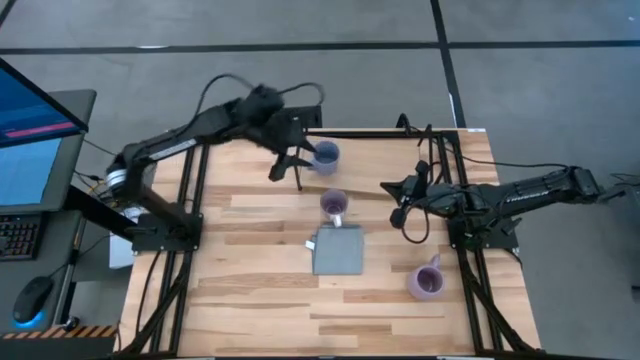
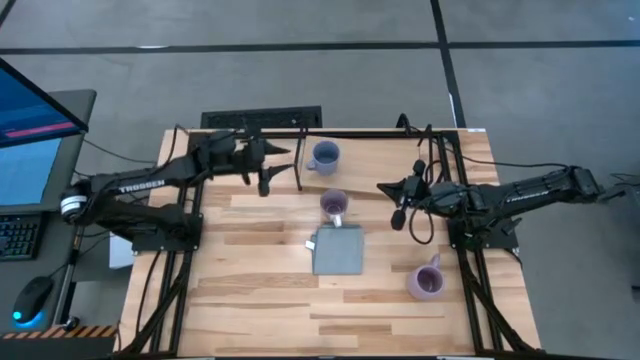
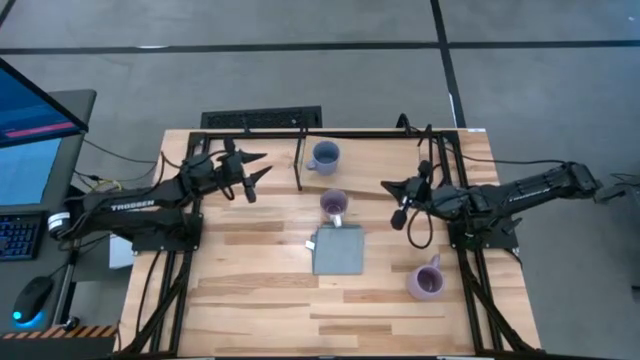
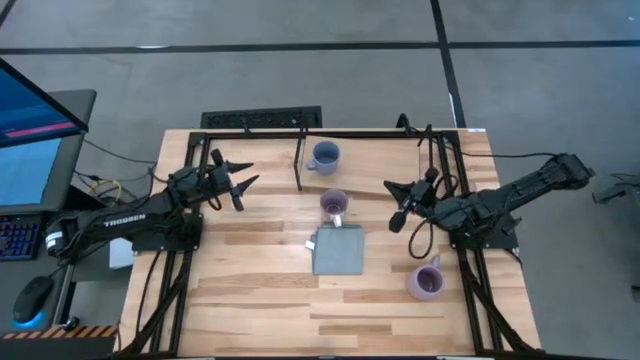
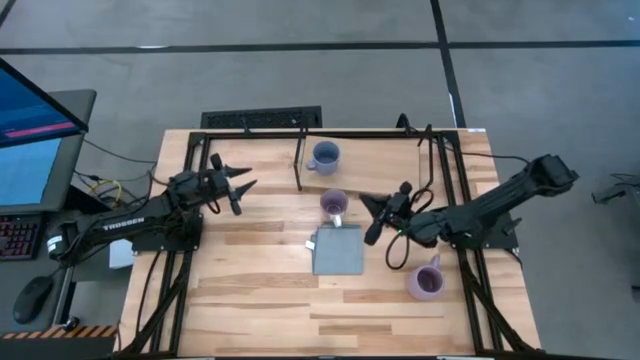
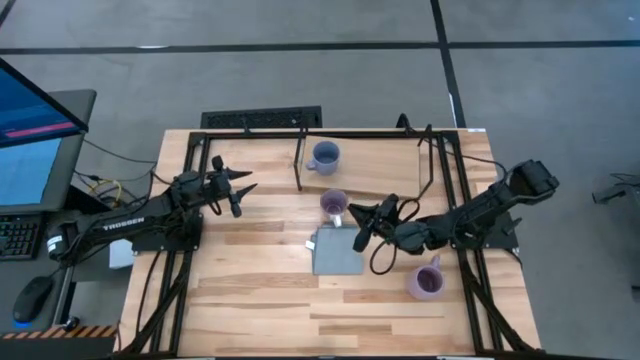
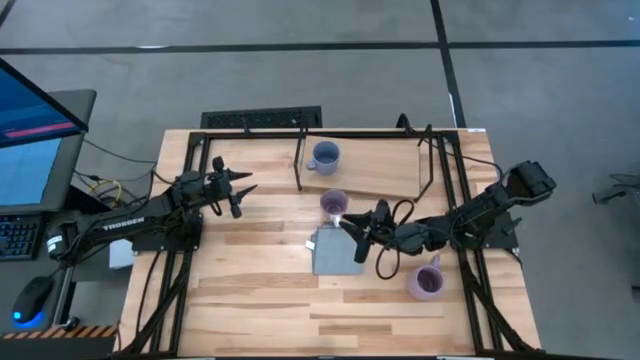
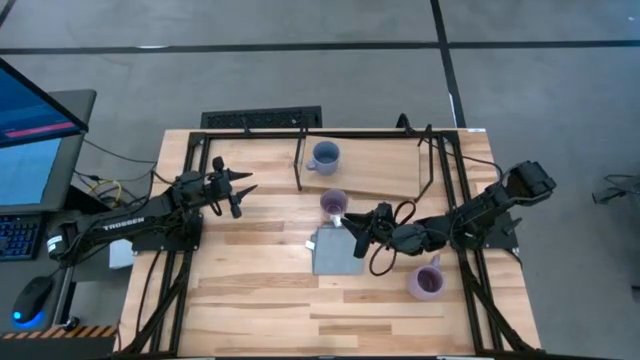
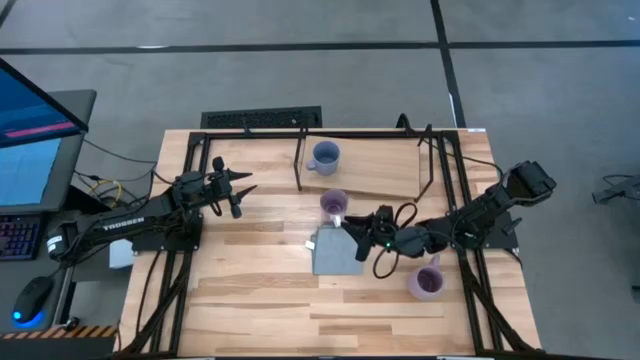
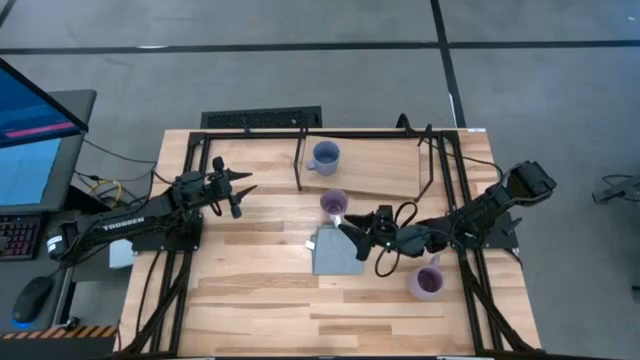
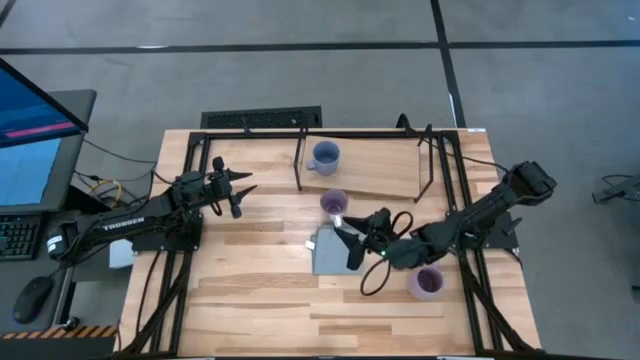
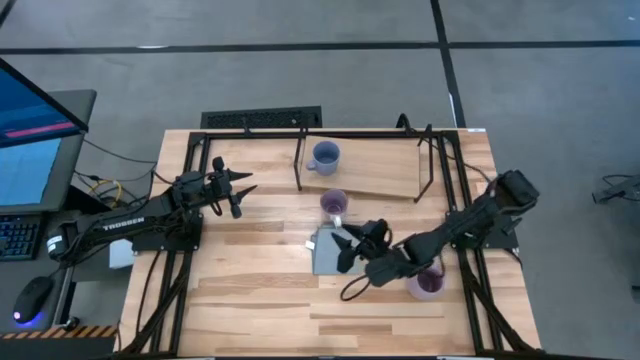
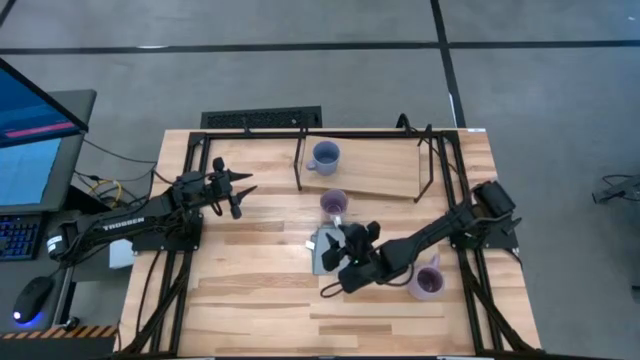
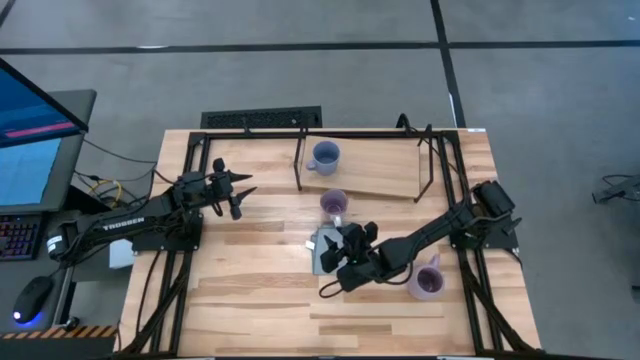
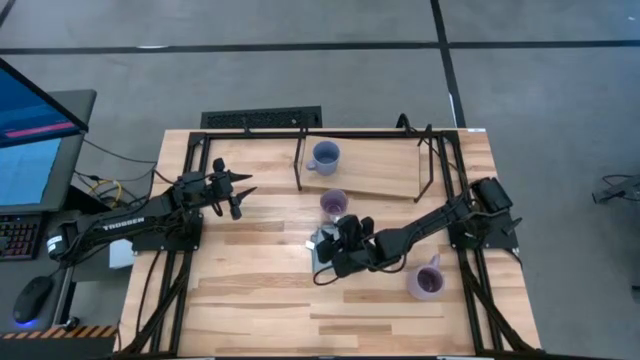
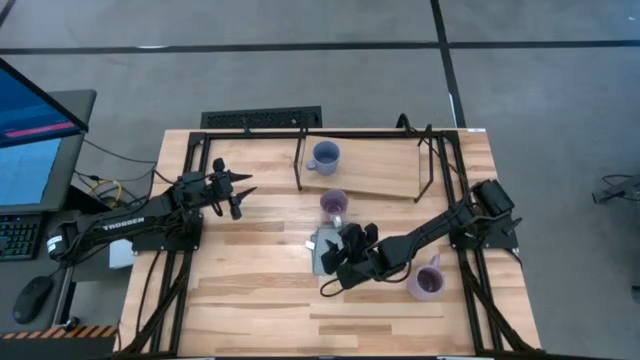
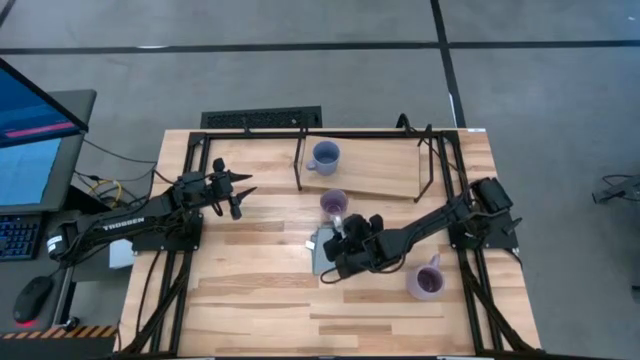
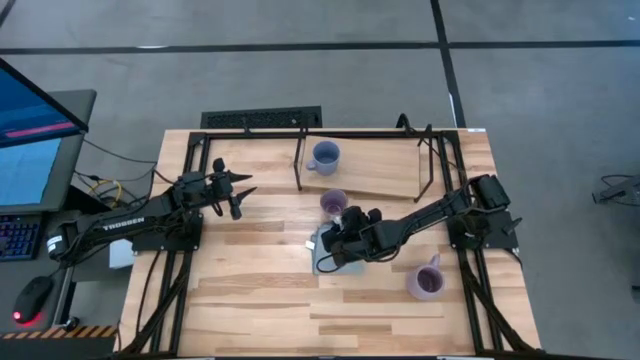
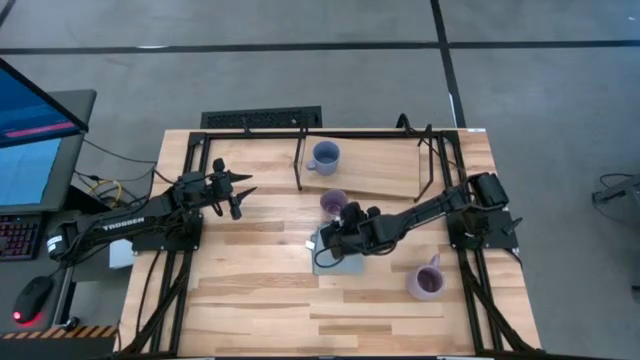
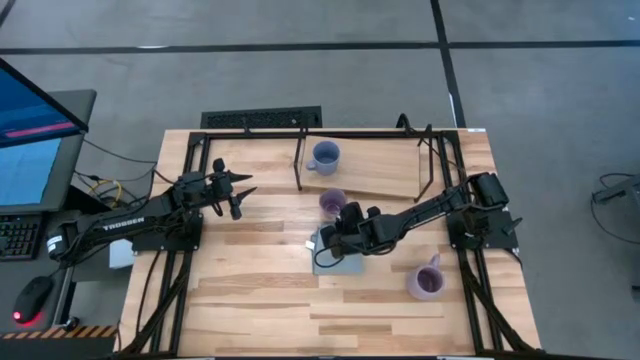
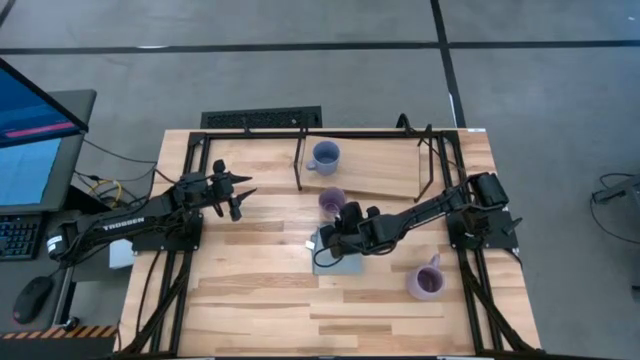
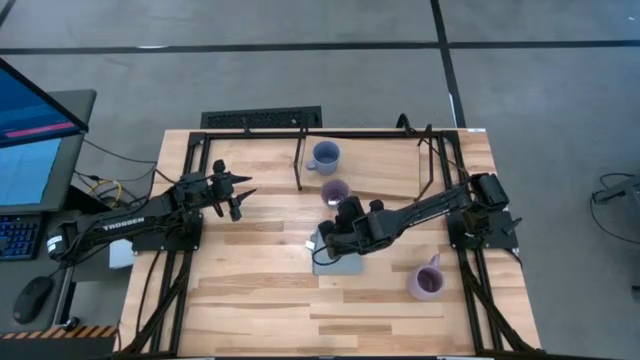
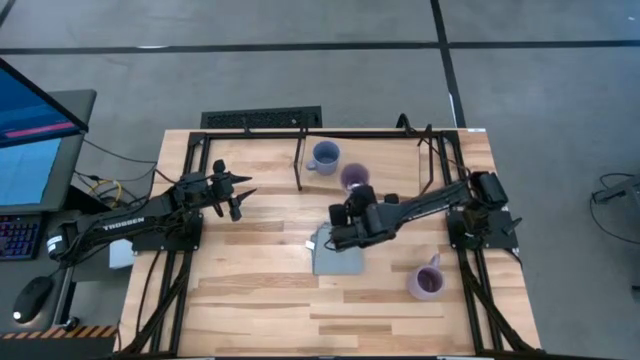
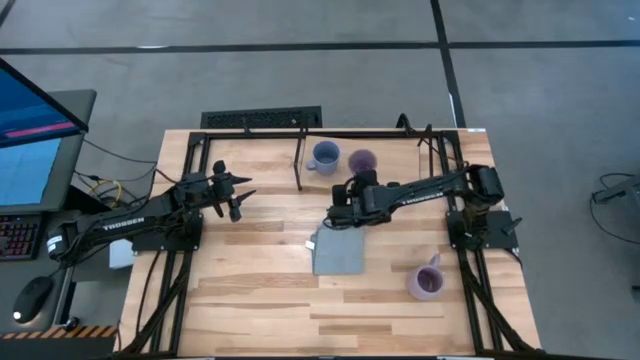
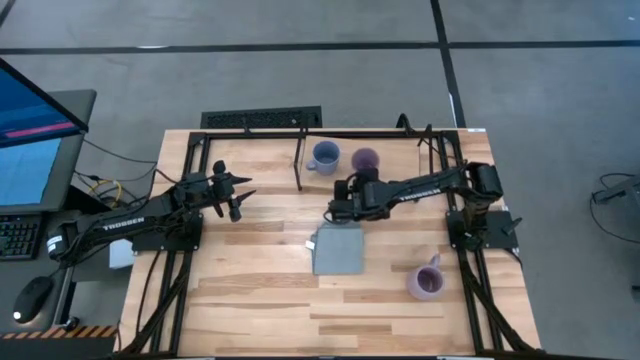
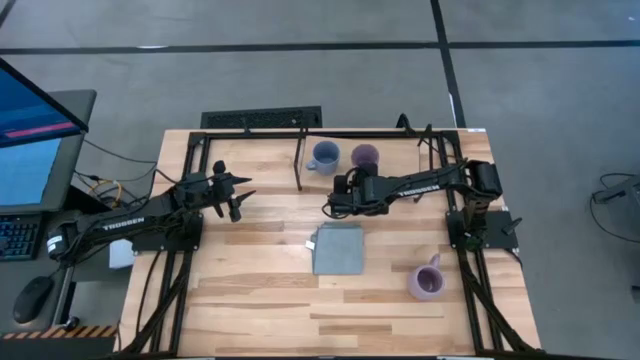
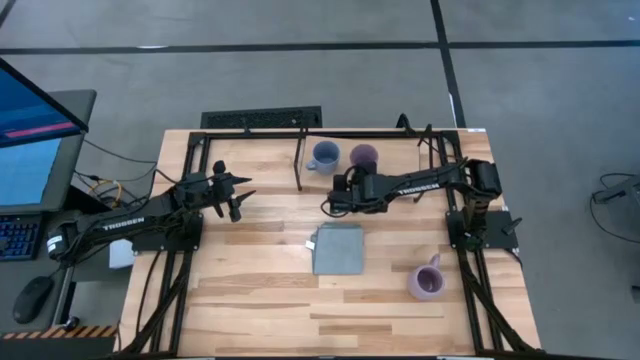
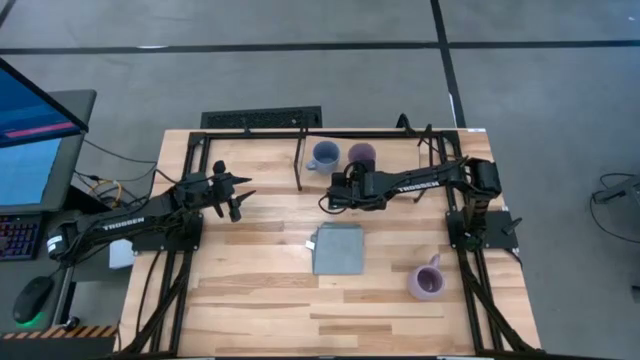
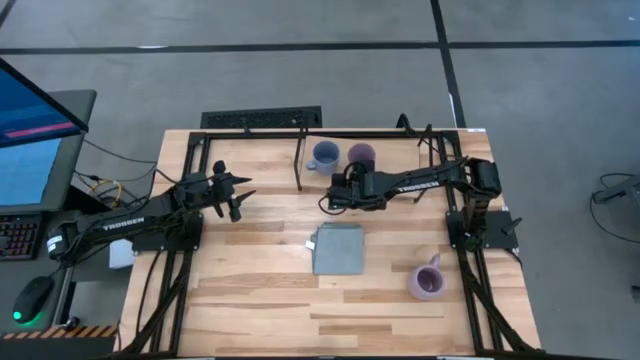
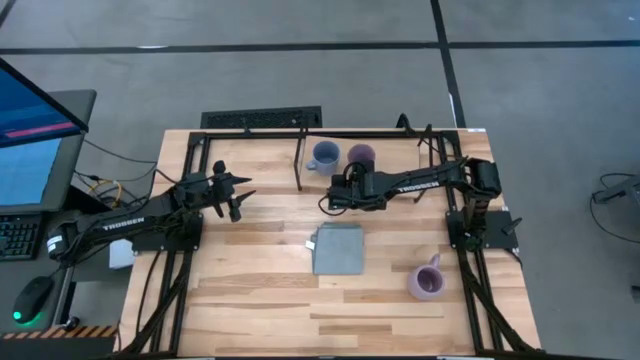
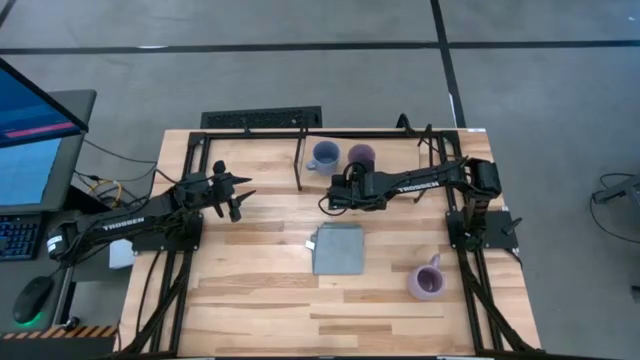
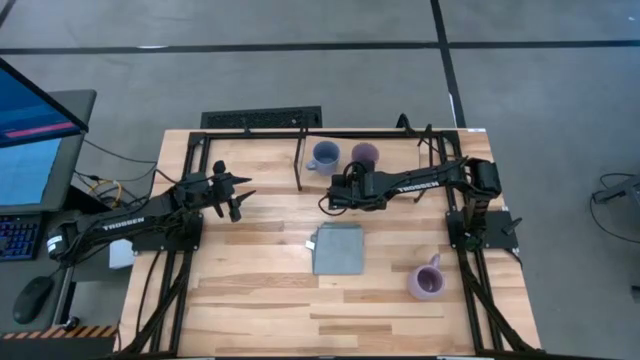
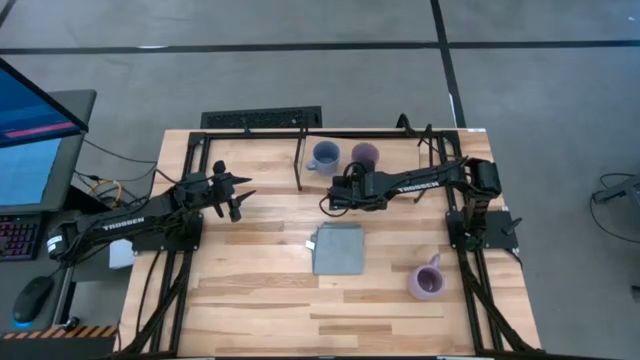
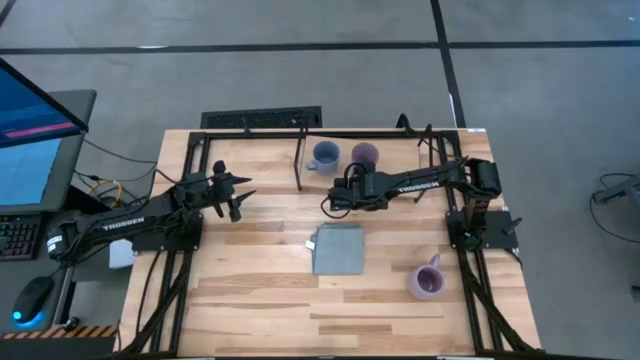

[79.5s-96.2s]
Task: Stack small to large cups/mugs on shelf
Put the left violet cup on the shelf

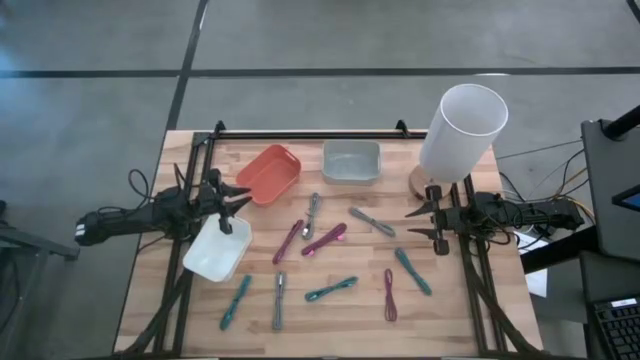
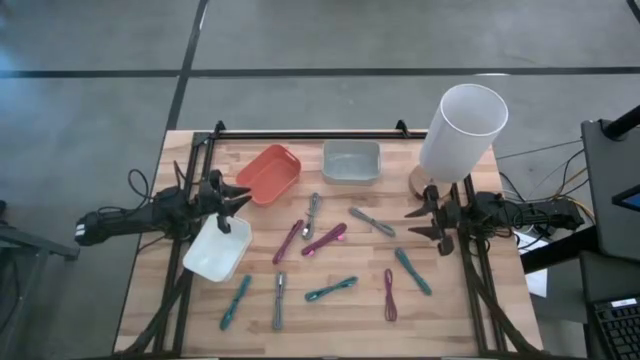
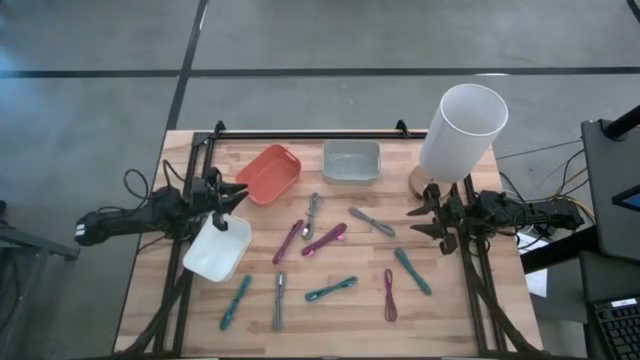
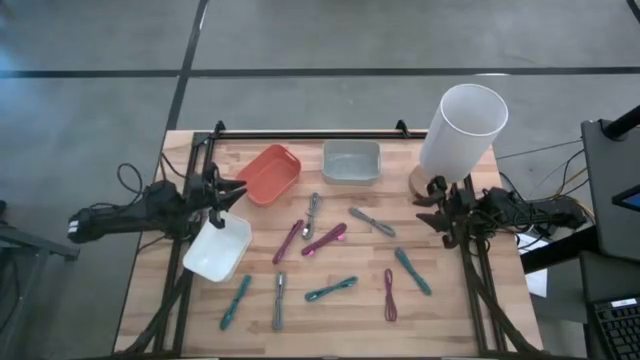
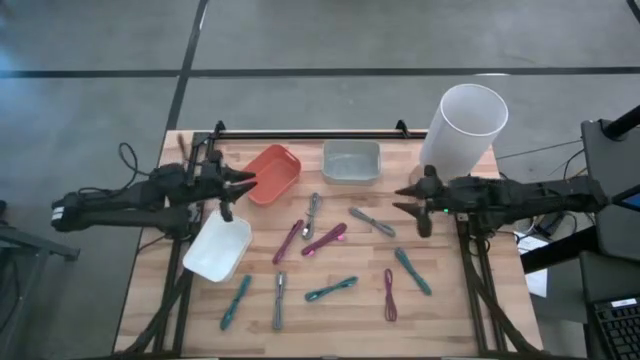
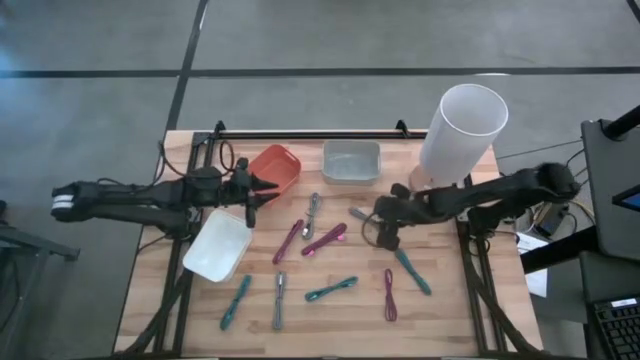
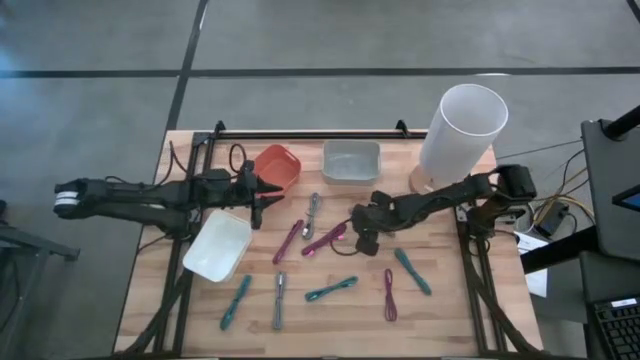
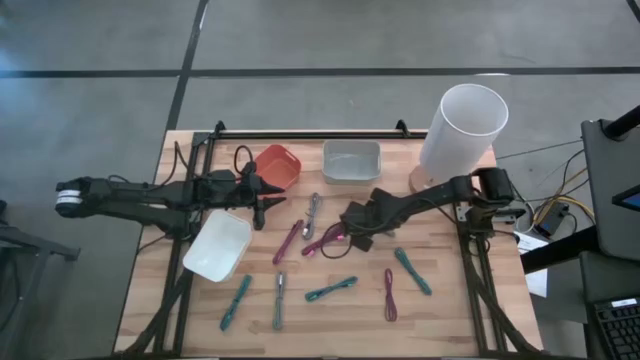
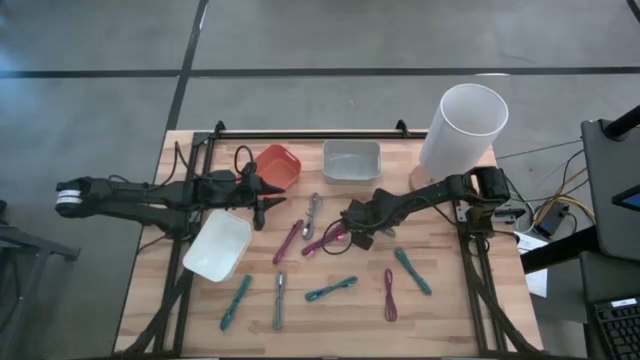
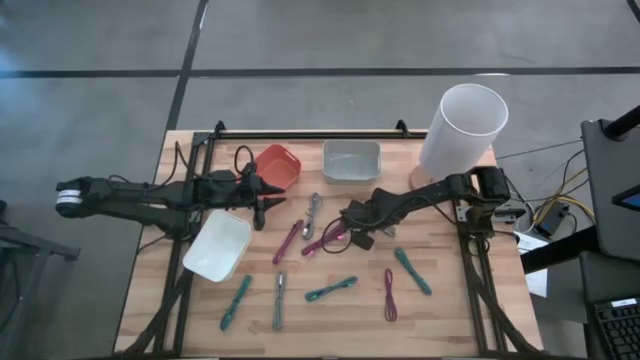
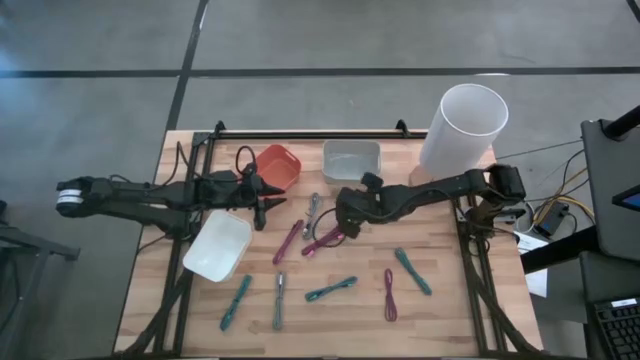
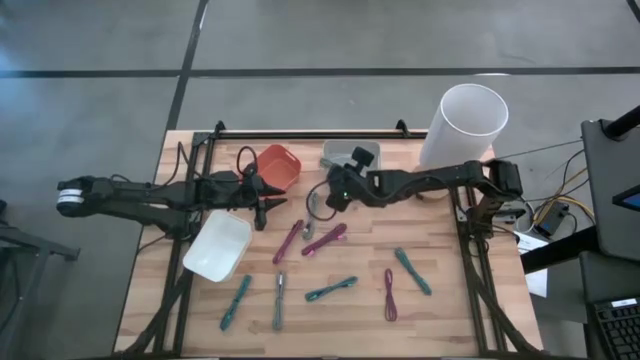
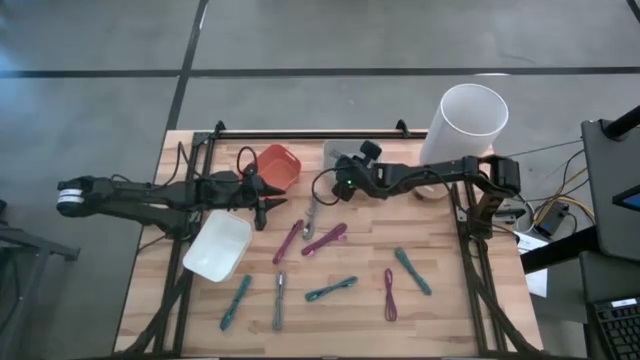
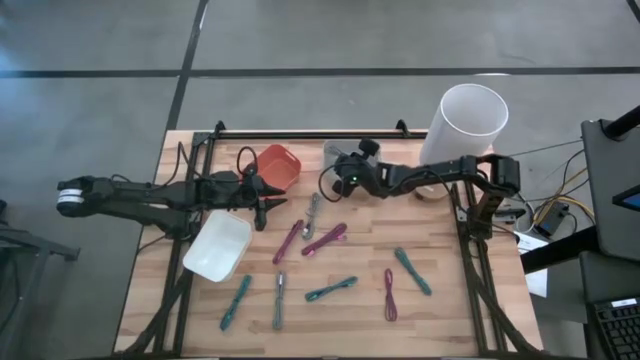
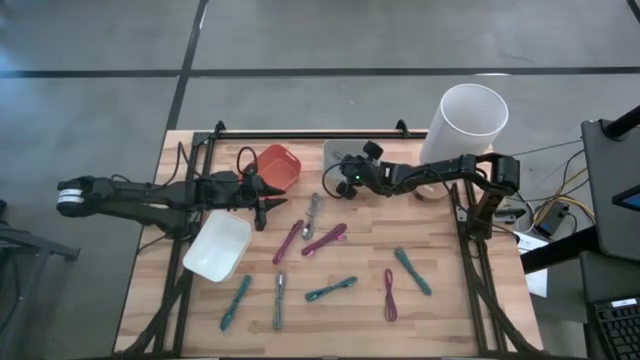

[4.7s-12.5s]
Task: Pick & Place USB Port
Put the top right white USB cable into the gray bin
